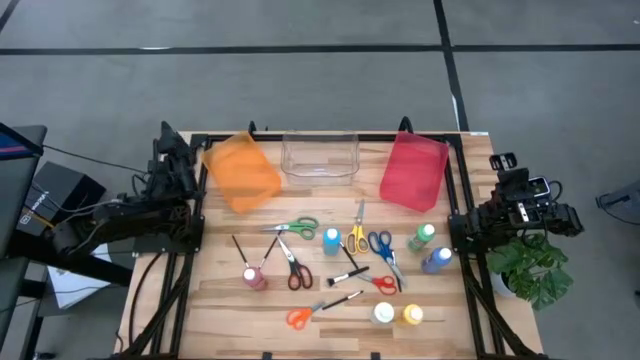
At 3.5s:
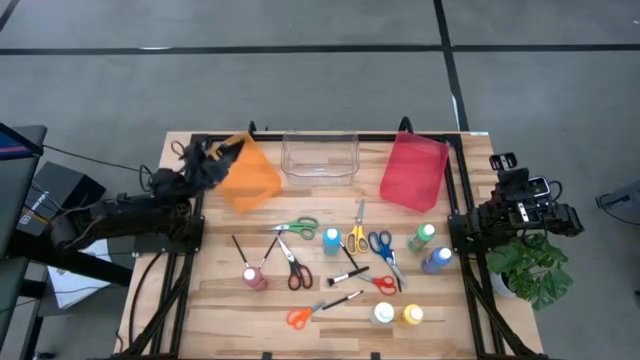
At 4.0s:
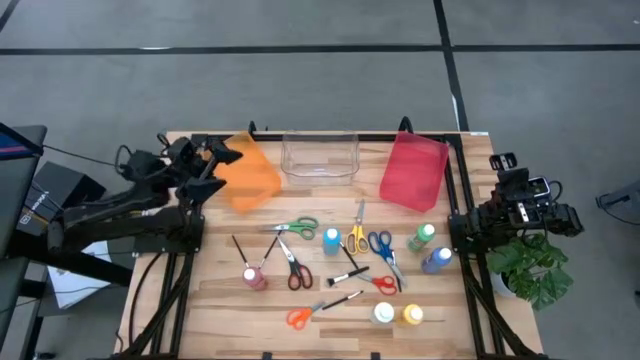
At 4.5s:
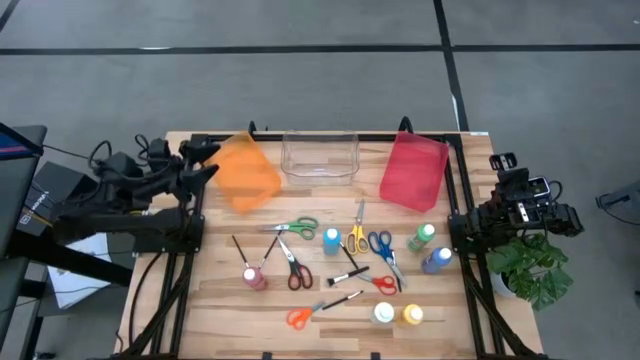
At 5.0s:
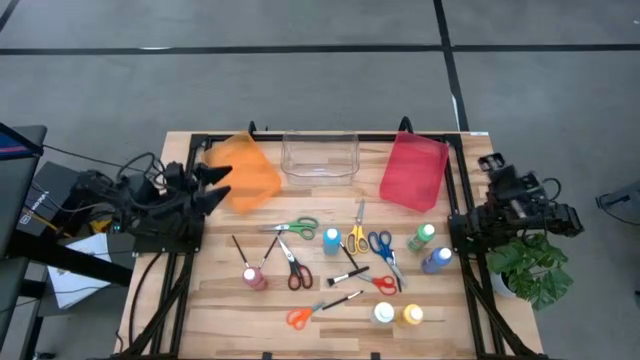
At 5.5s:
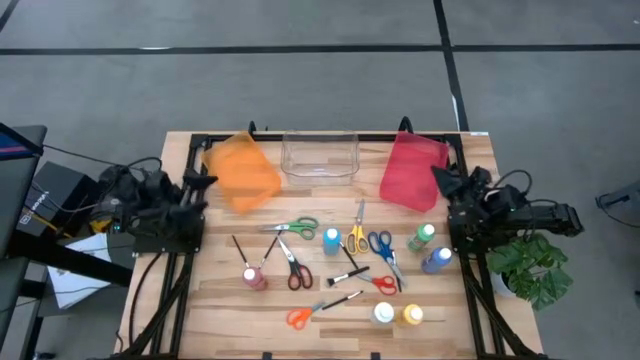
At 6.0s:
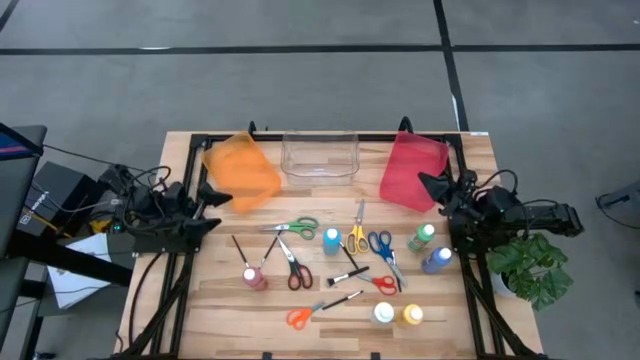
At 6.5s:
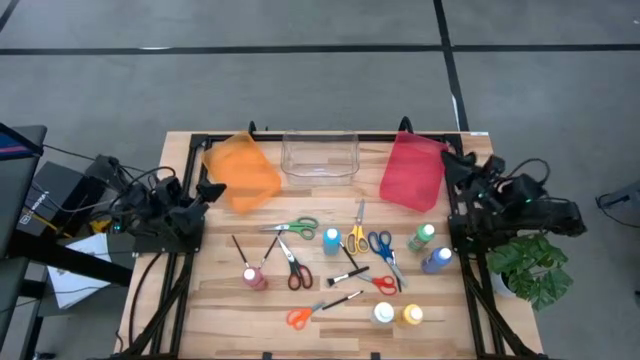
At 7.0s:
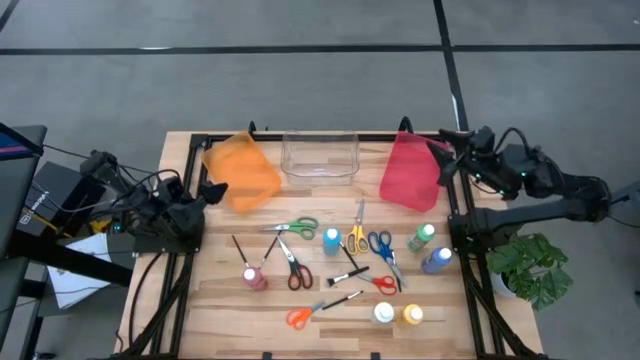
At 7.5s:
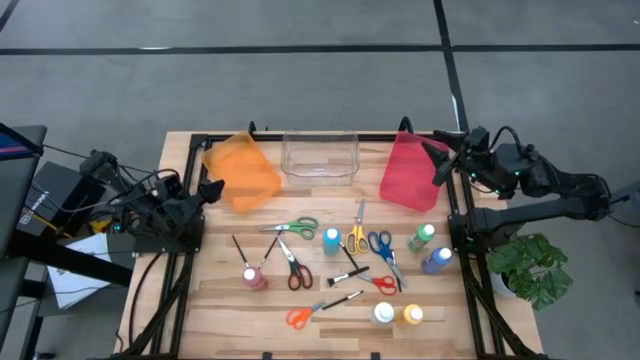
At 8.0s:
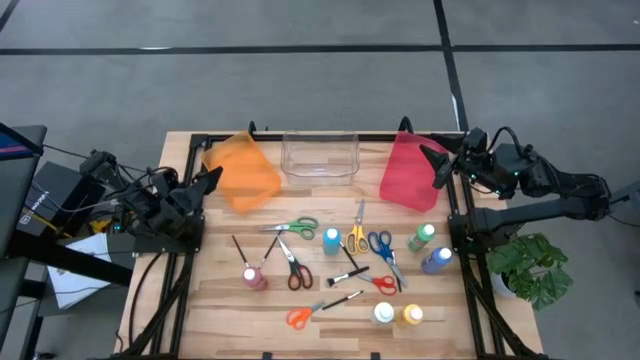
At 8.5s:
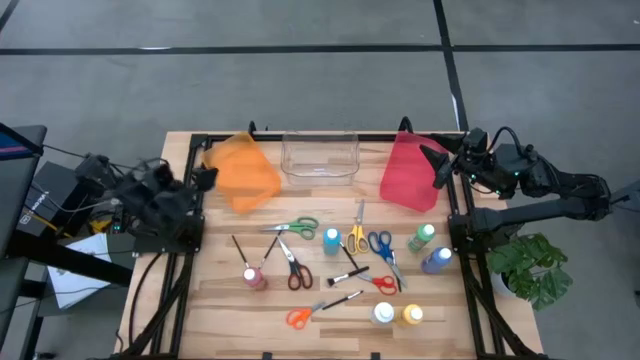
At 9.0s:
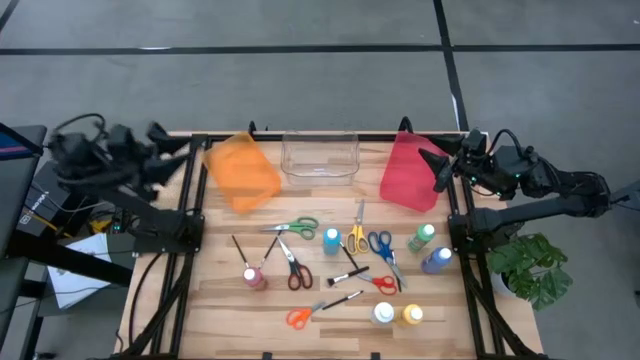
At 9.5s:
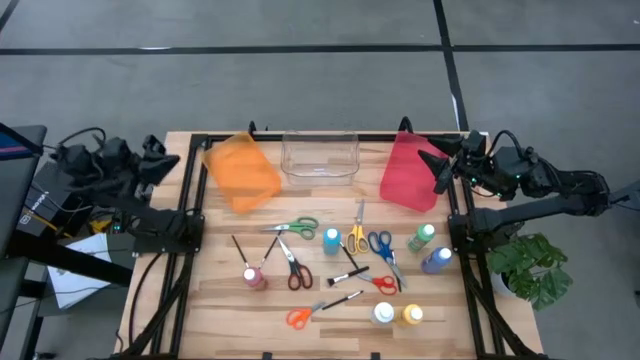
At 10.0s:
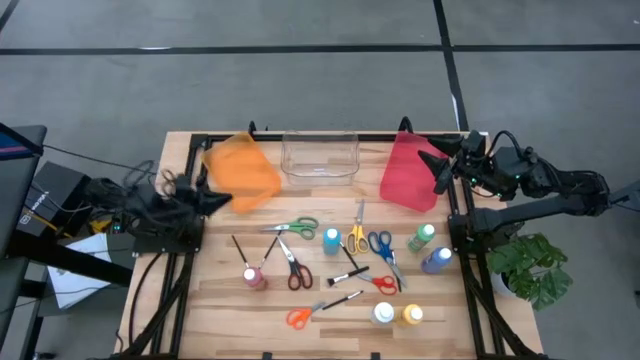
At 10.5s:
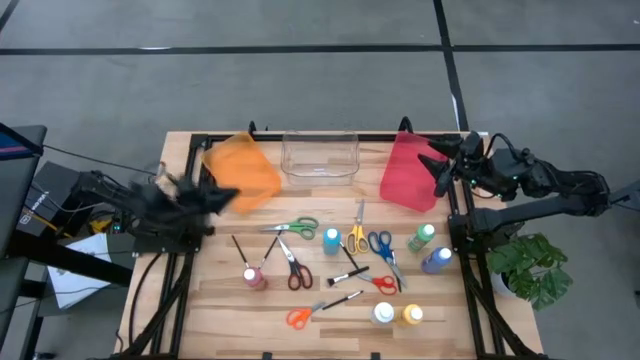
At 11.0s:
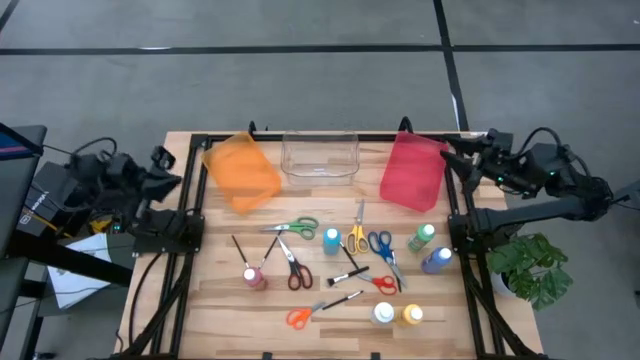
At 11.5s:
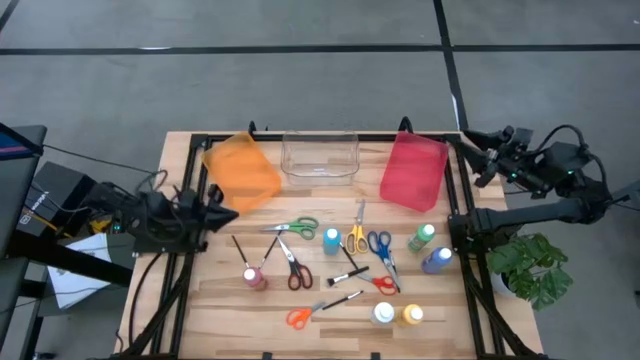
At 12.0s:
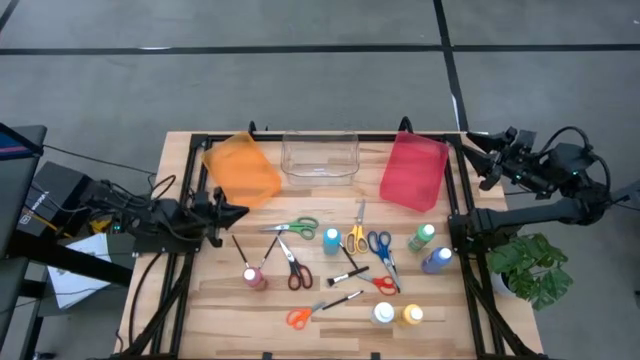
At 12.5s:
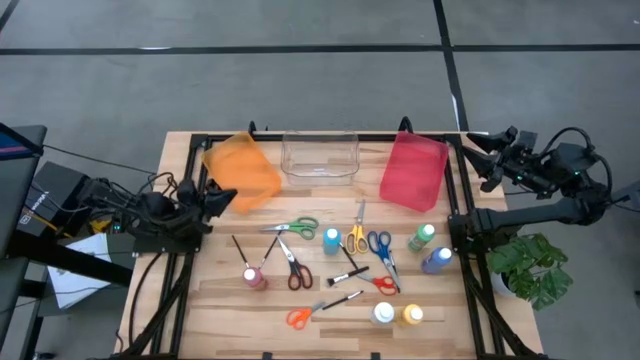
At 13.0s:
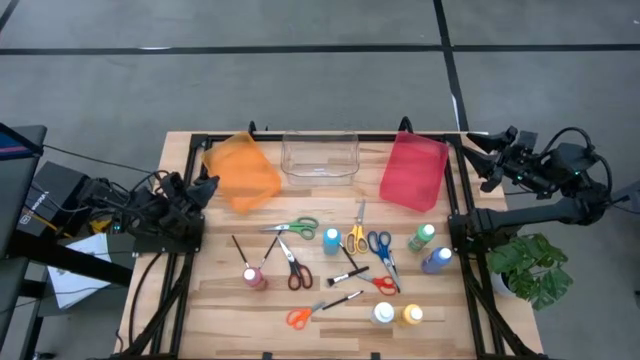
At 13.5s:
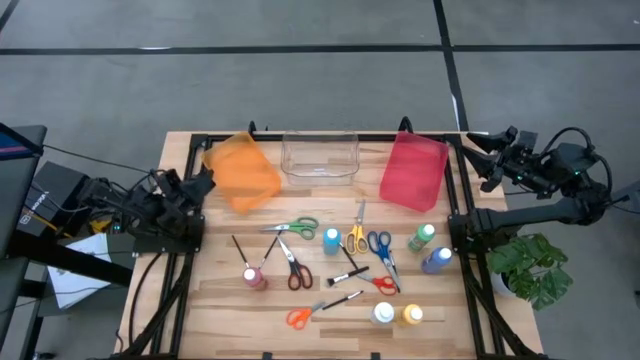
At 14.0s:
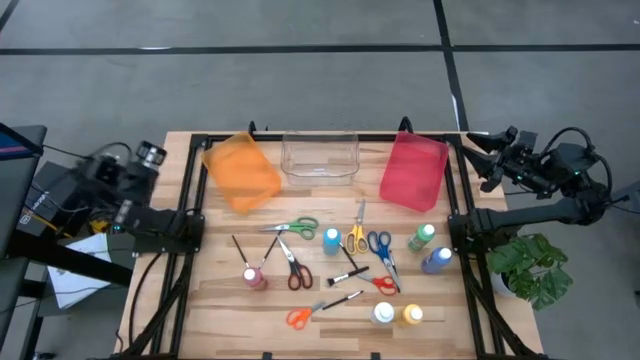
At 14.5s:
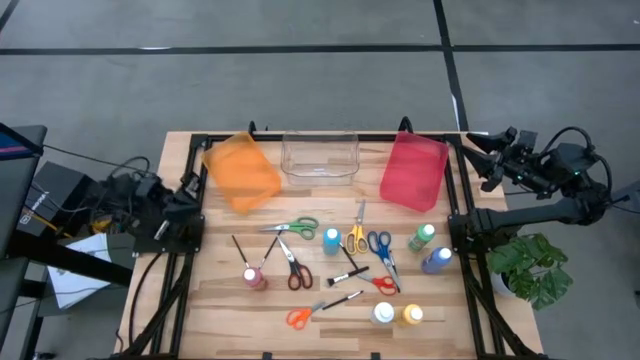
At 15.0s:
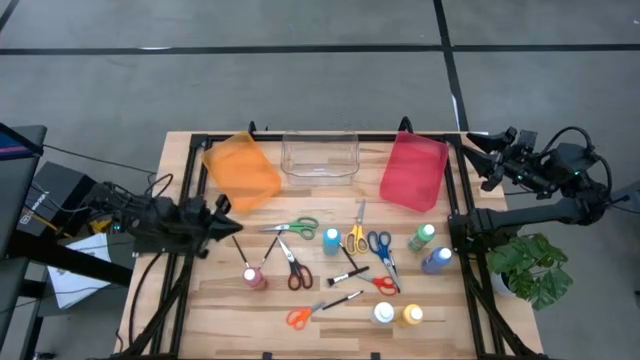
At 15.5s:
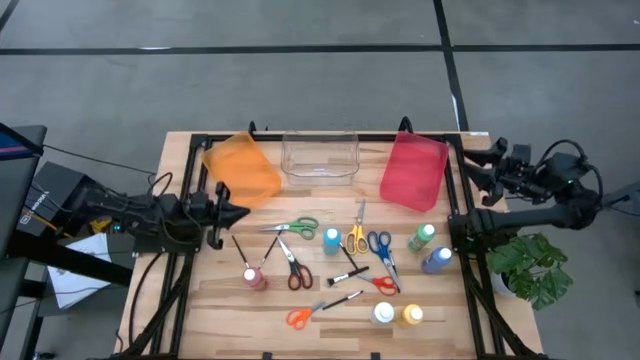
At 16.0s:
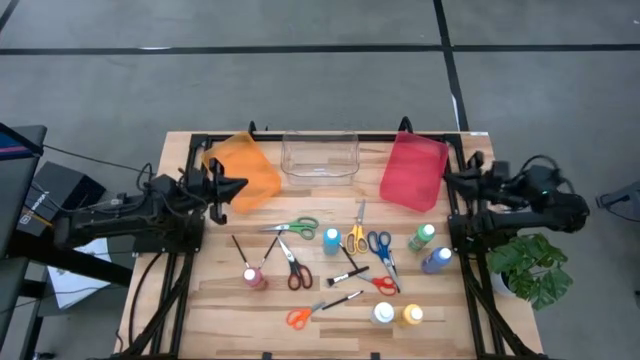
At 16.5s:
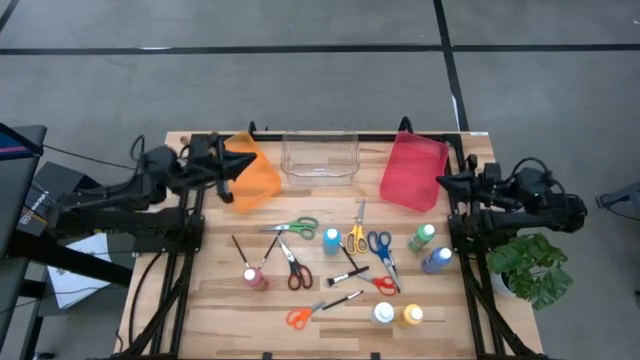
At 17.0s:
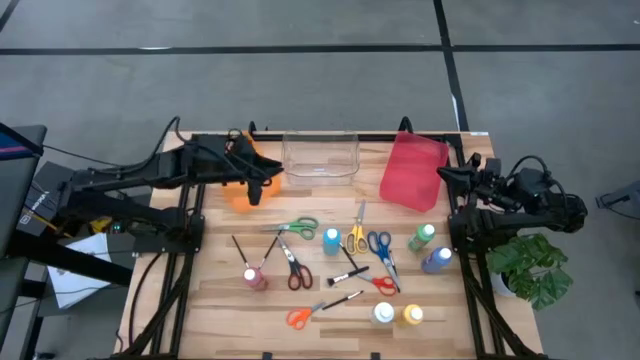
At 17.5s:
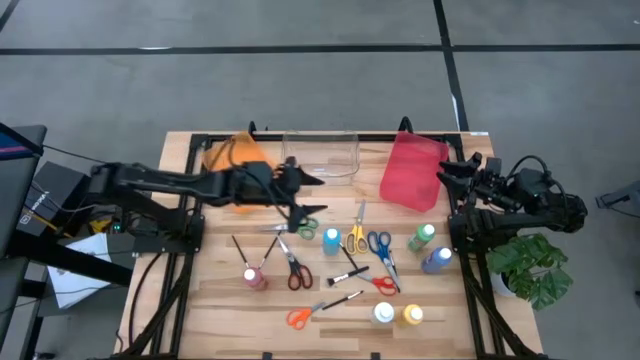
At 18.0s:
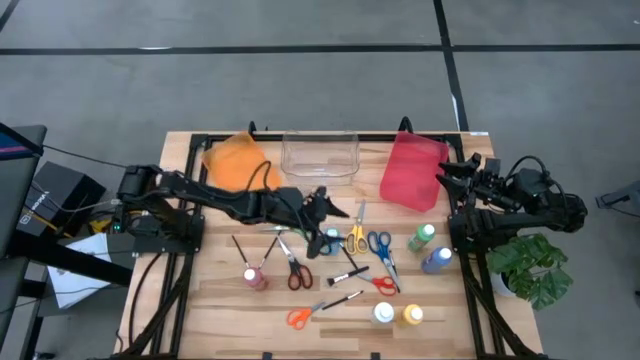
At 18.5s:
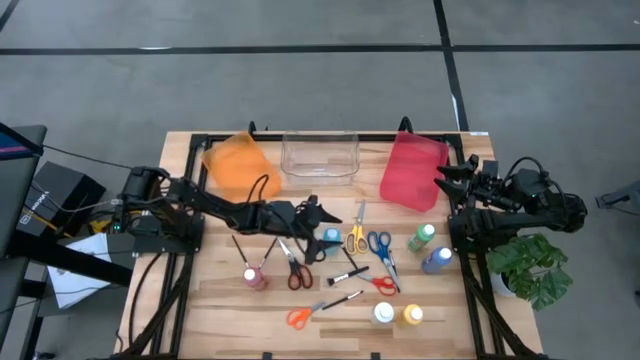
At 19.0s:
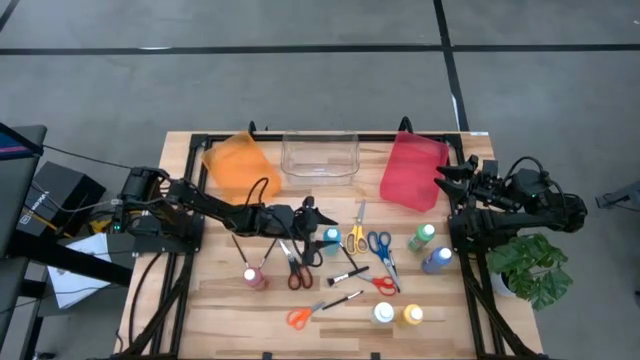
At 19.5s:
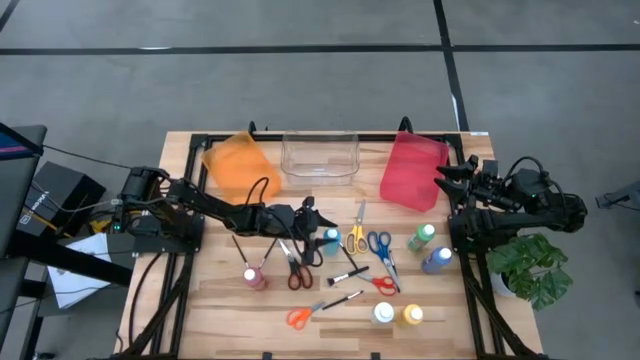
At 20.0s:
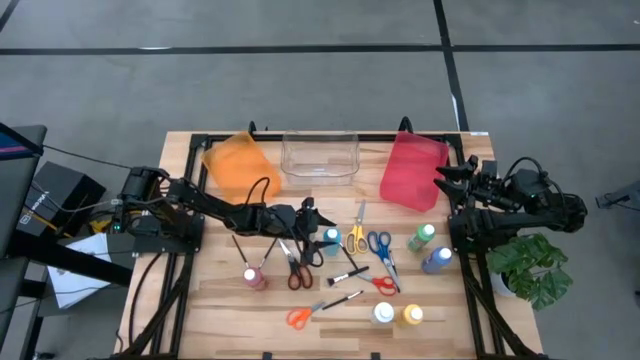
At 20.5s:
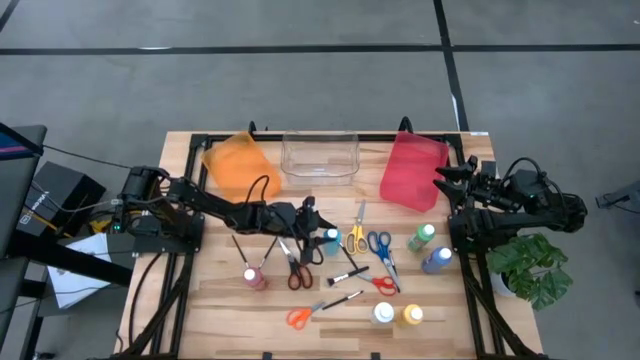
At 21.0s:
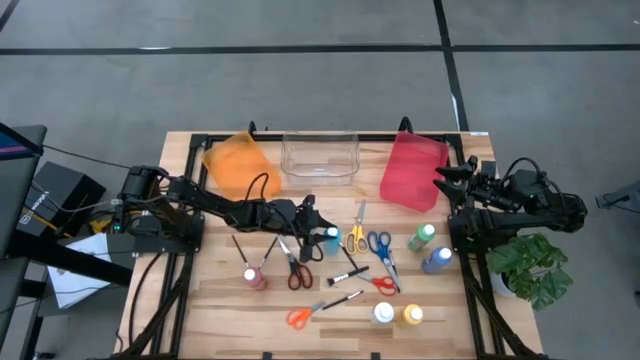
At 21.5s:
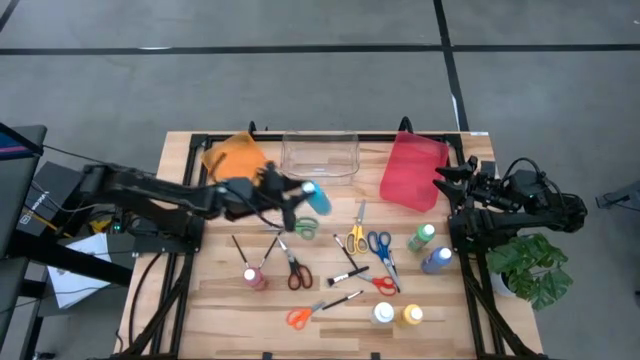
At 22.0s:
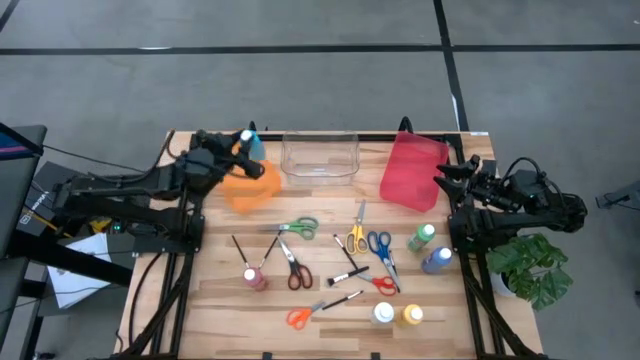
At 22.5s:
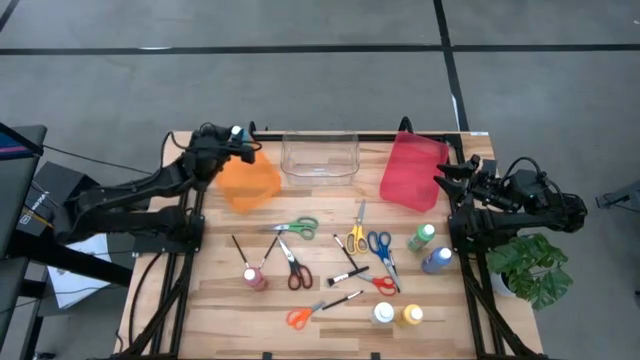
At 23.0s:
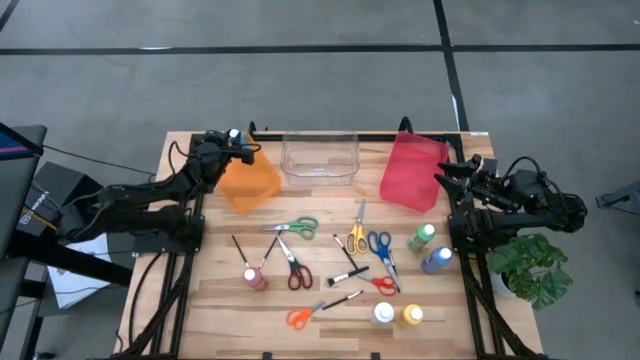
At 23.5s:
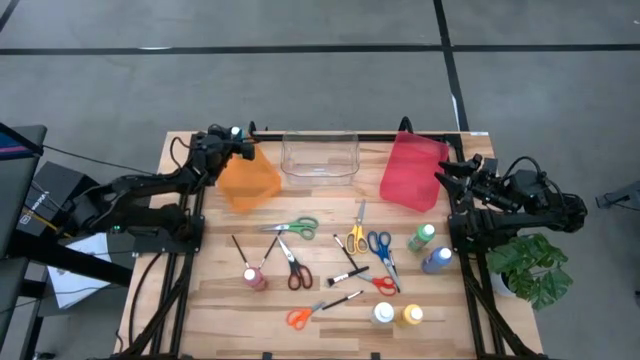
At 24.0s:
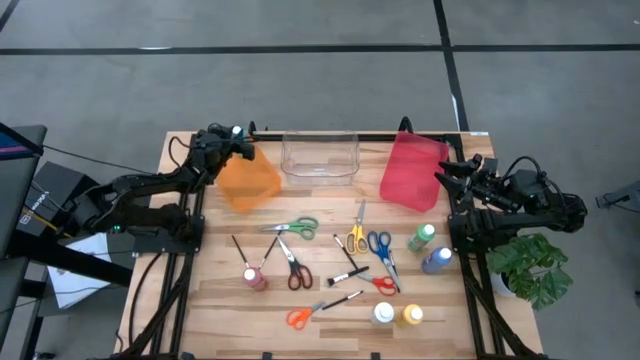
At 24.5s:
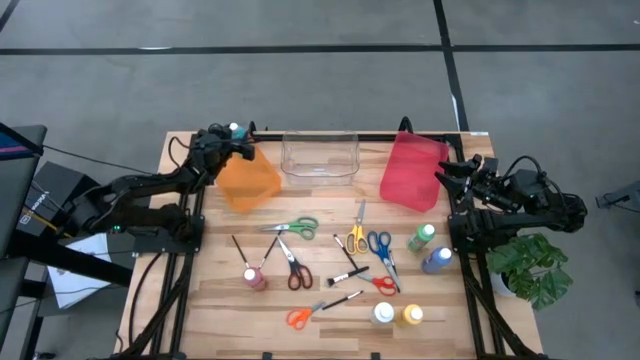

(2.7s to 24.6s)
Task: Pick & Place Paint Supplies
Put the light blue paint bottle into the orange bin
